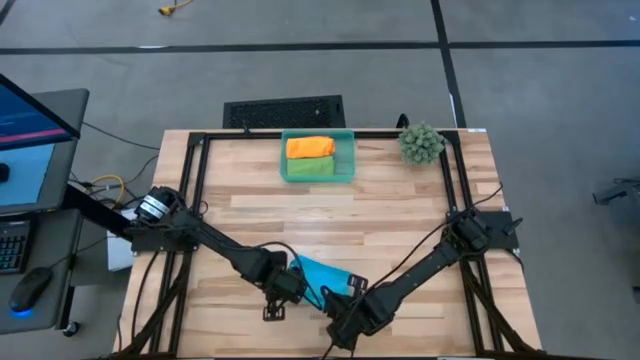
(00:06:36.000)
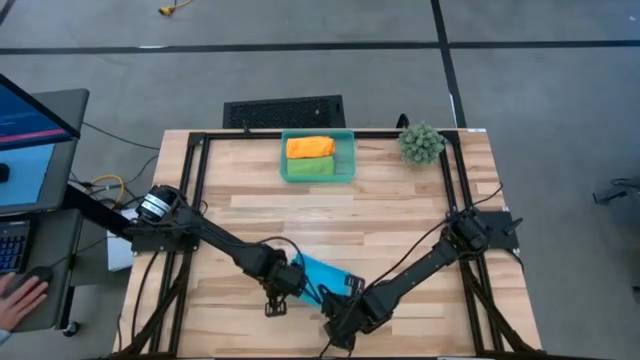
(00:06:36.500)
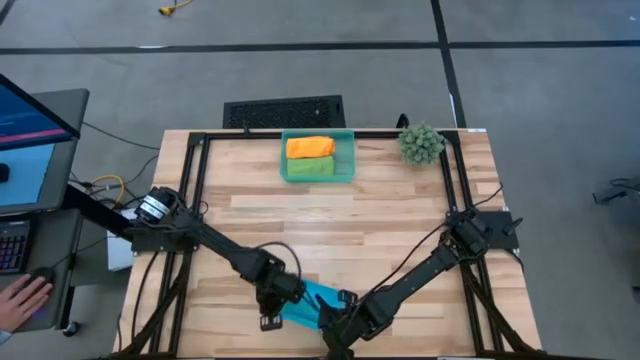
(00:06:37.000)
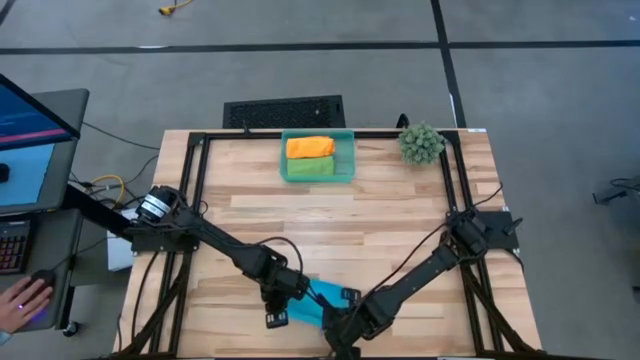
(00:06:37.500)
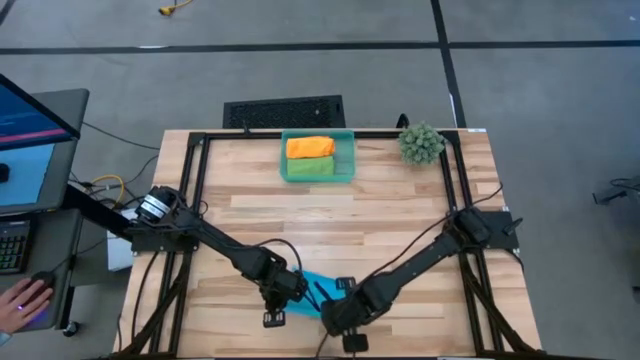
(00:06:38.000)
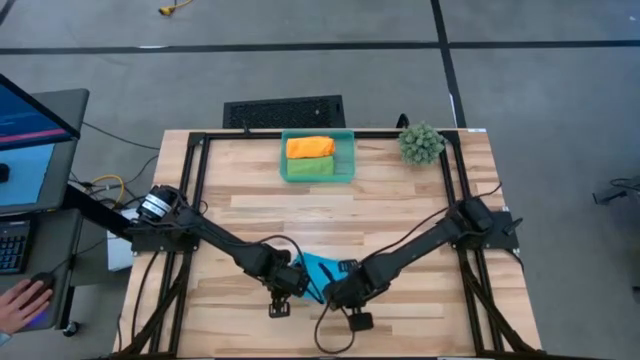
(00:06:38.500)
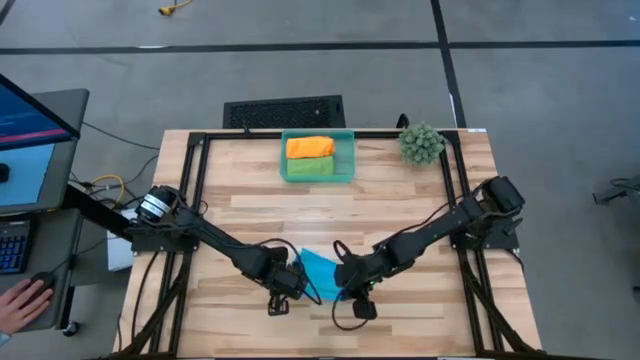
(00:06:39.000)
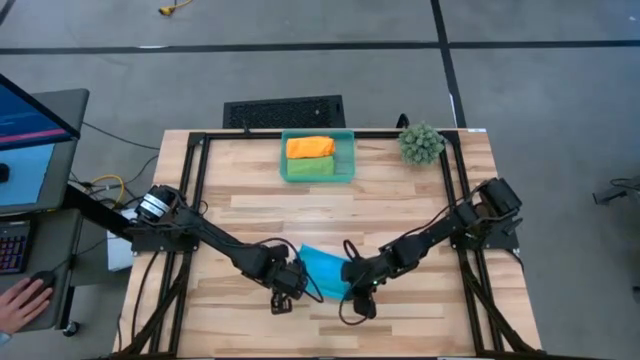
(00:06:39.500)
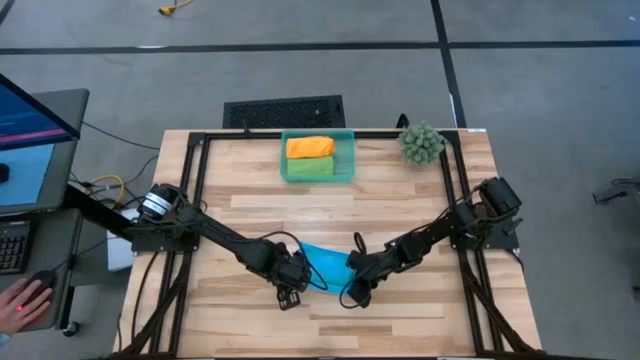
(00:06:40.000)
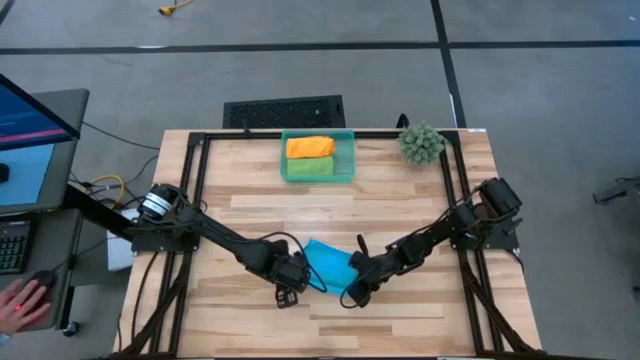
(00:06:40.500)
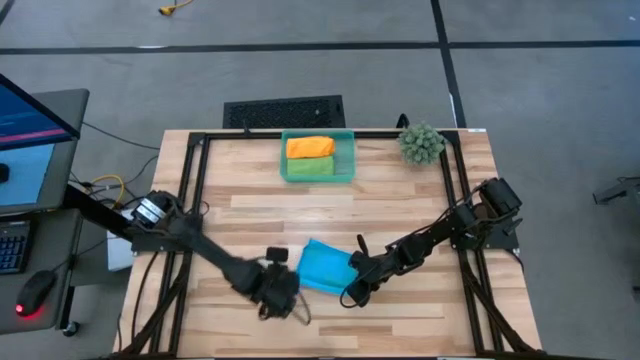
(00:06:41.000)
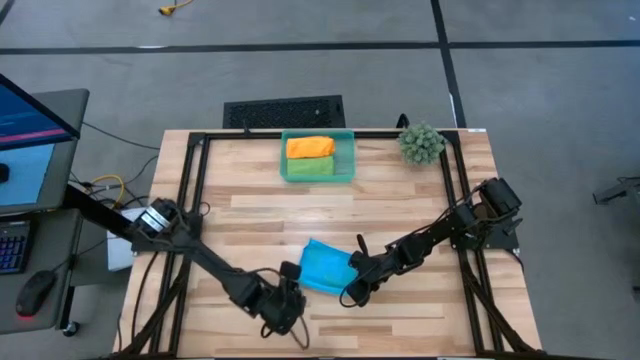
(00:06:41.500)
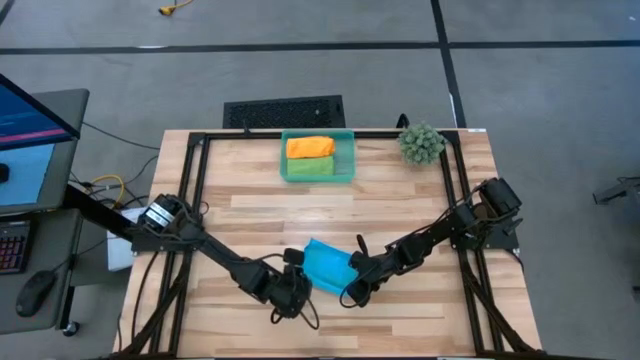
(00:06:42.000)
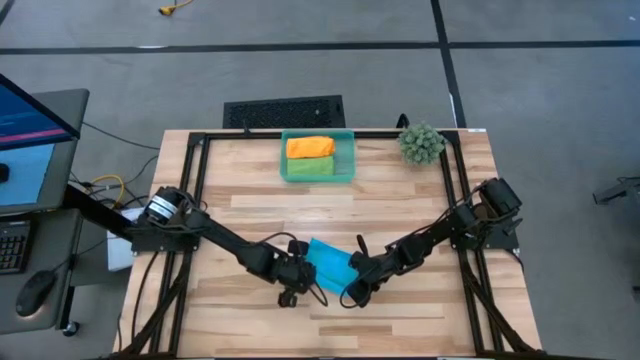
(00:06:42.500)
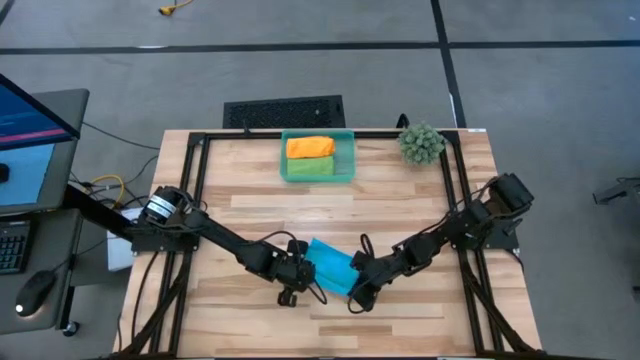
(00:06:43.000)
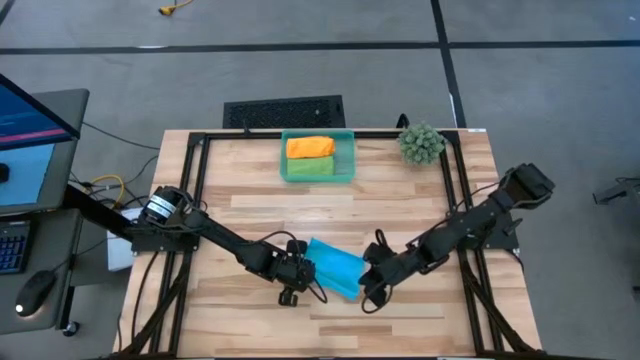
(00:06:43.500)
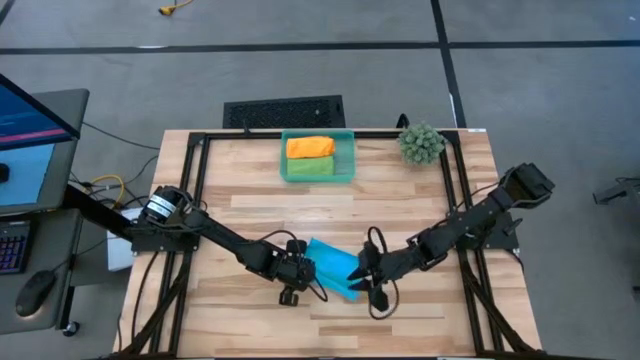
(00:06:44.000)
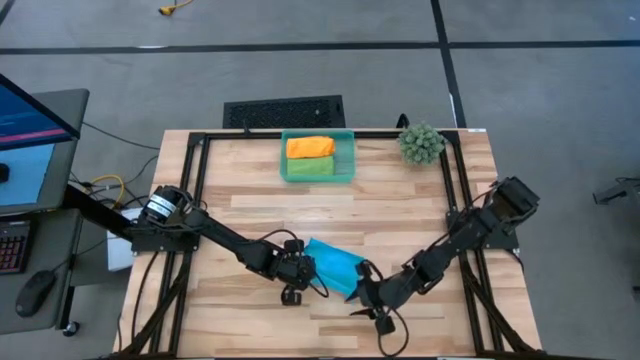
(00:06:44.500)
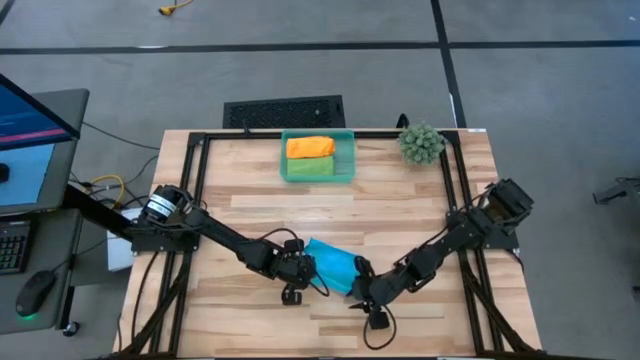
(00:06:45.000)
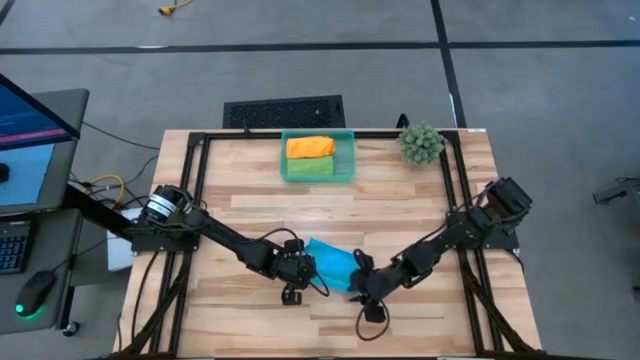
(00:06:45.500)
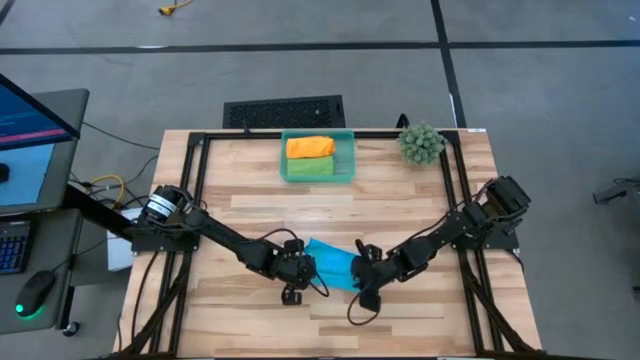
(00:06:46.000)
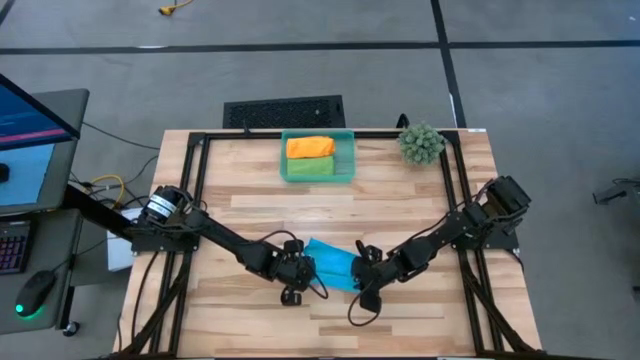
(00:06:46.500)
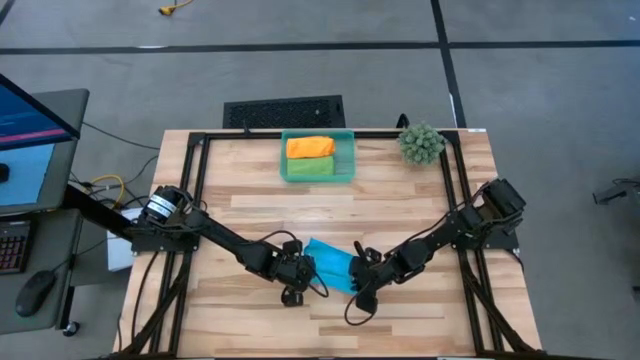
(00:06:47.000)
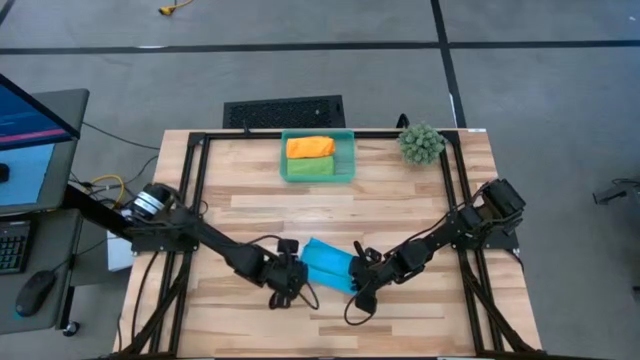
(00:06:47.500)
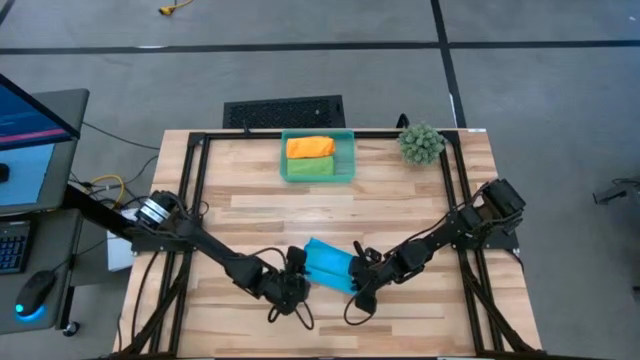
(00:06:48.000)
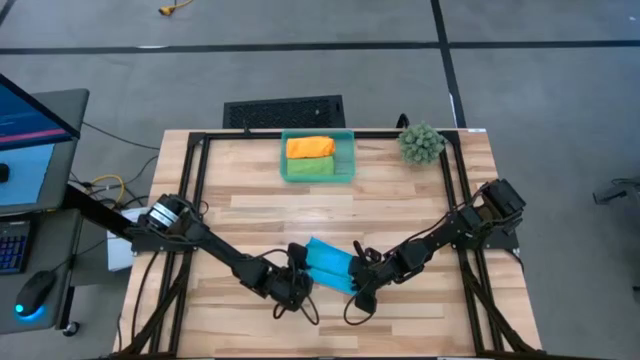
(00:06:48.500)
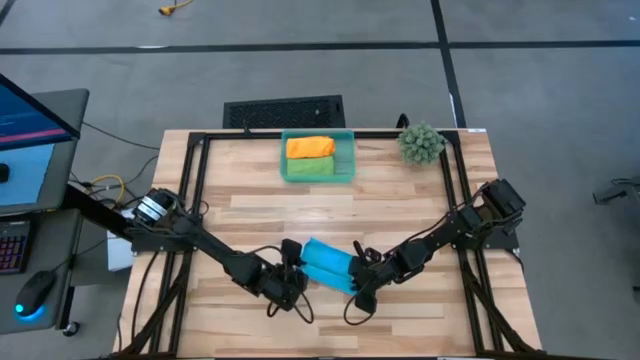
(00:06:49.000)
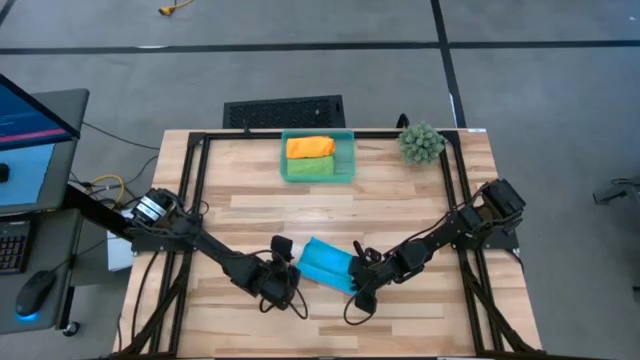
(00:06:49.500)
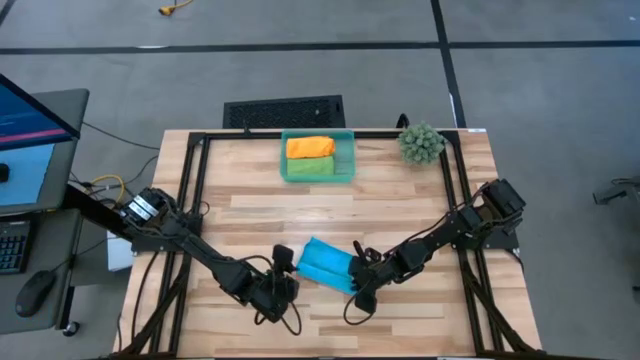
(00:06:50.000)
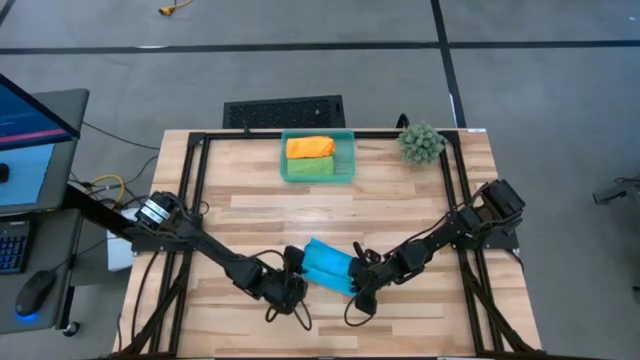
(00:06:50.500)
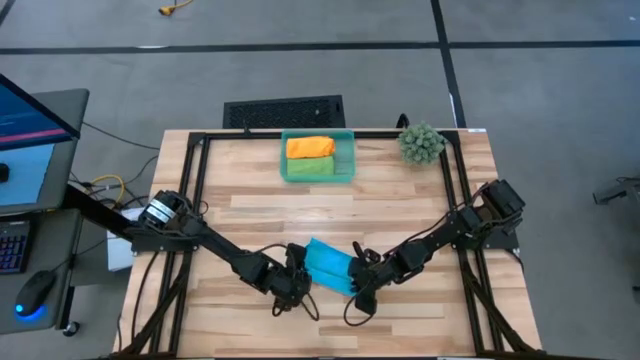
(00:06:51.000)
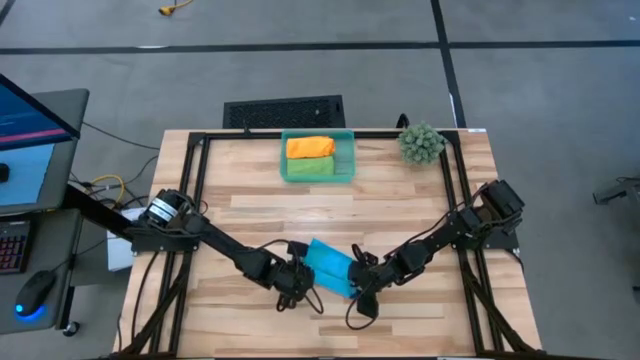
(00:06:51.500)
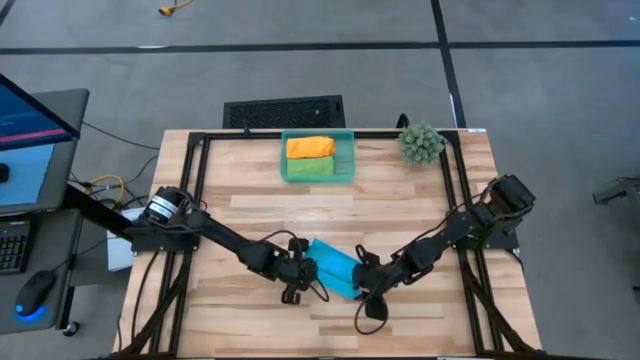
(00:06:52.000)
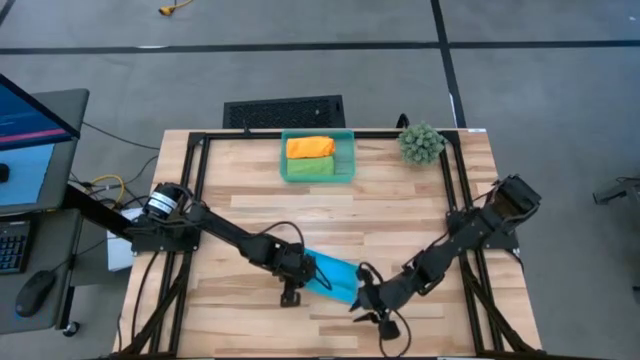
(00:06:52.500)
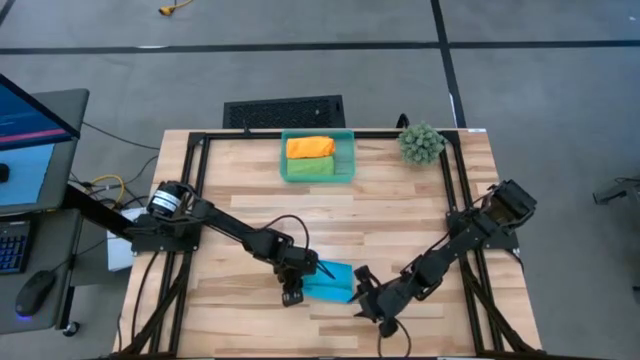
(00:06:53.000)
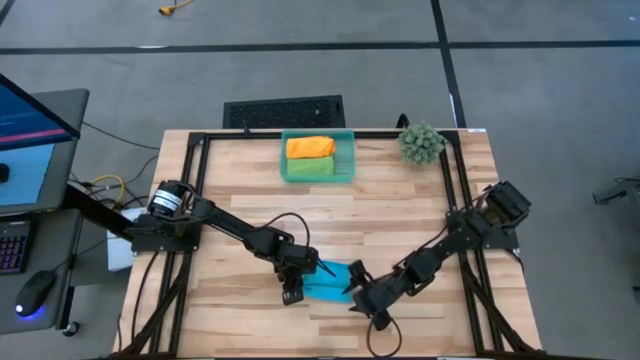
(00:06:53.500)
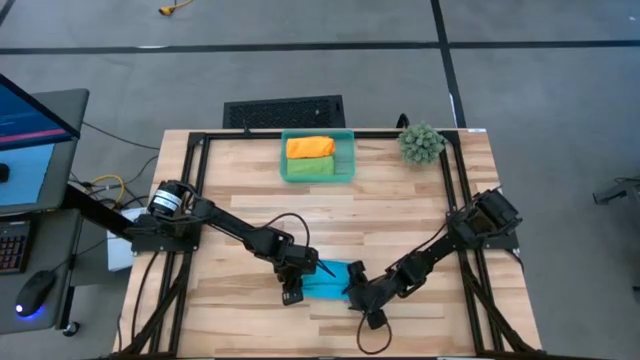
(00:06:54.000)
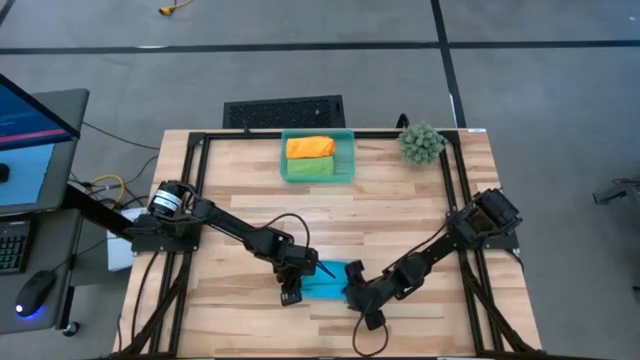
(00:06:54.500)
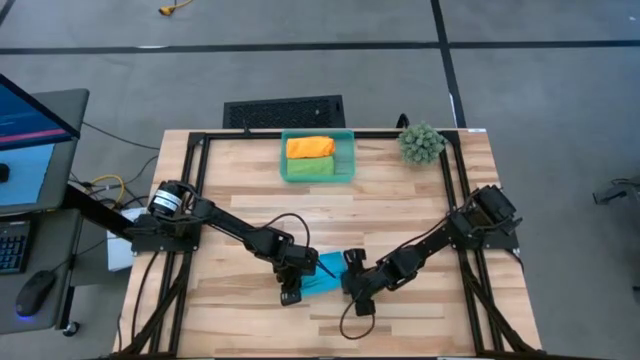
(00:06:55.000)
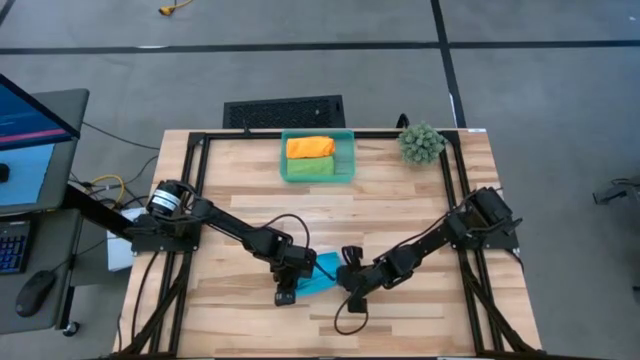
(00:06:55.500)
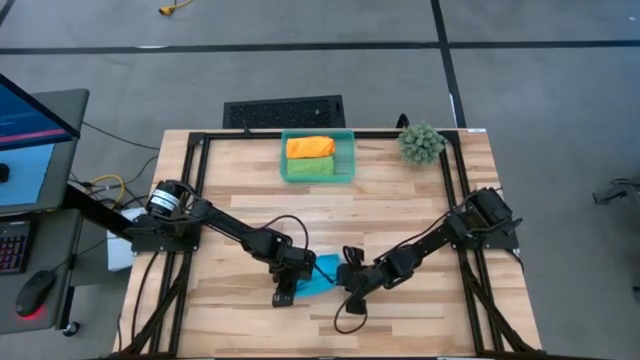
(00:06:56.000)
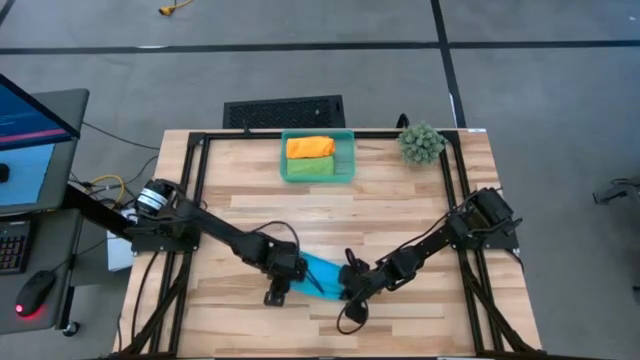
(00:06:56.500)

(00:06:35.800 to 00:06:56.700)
Task: Roll microfiber towels into tight, uniform cylinder then place into a basket
Roll the blue microfiber cloth
